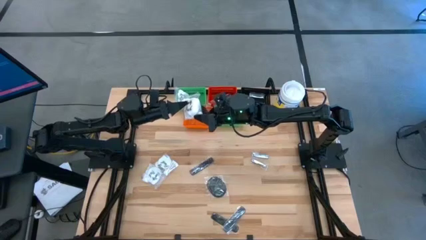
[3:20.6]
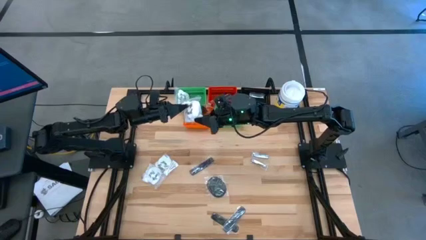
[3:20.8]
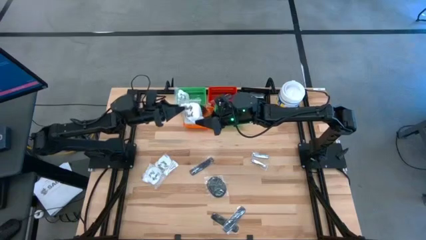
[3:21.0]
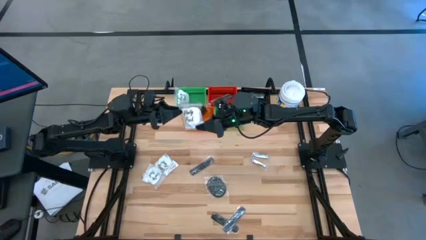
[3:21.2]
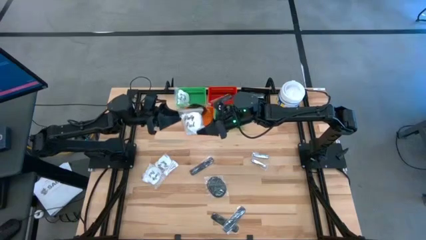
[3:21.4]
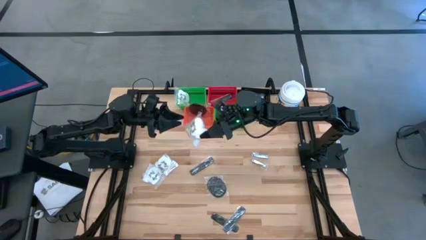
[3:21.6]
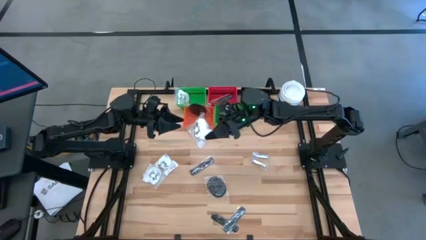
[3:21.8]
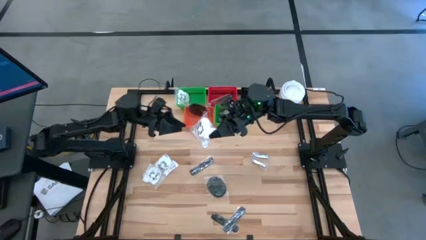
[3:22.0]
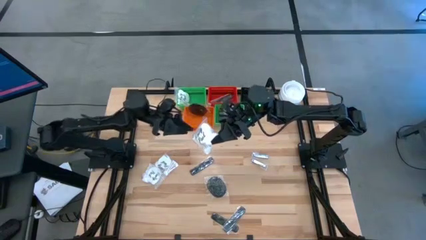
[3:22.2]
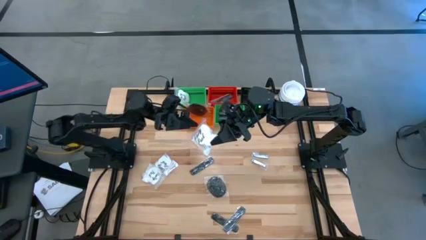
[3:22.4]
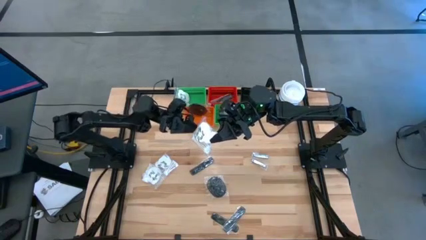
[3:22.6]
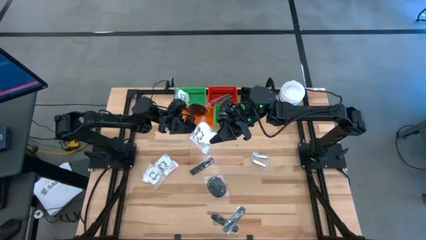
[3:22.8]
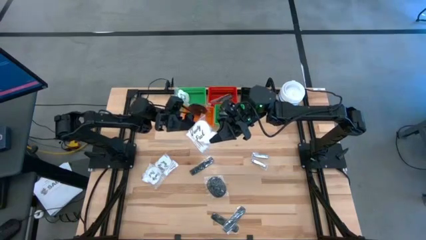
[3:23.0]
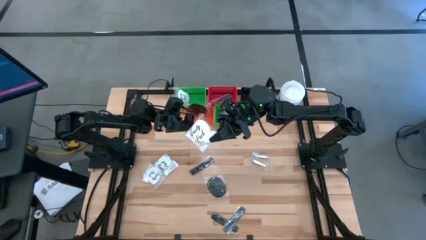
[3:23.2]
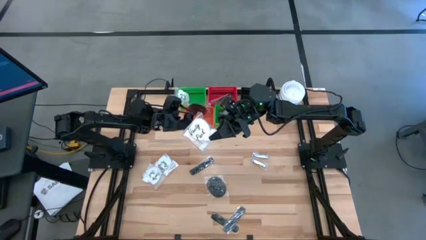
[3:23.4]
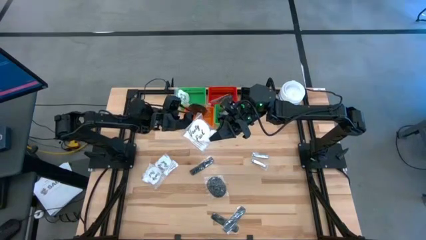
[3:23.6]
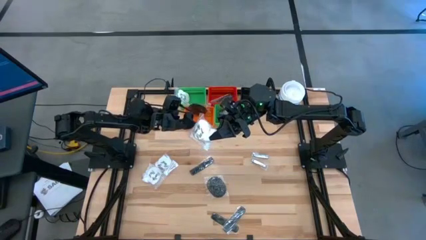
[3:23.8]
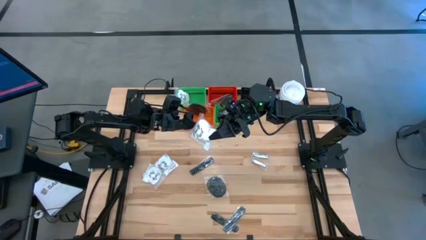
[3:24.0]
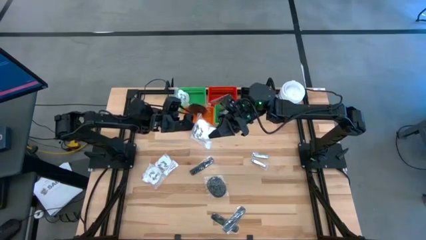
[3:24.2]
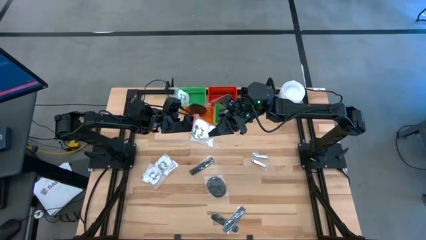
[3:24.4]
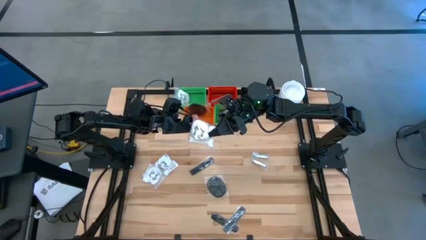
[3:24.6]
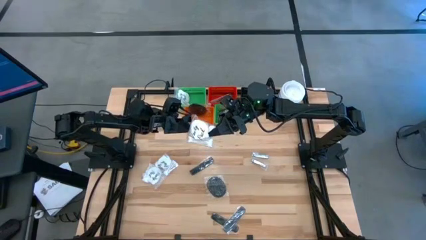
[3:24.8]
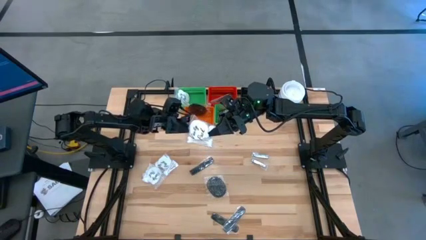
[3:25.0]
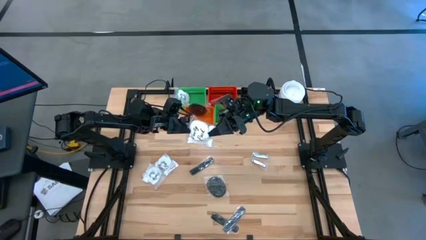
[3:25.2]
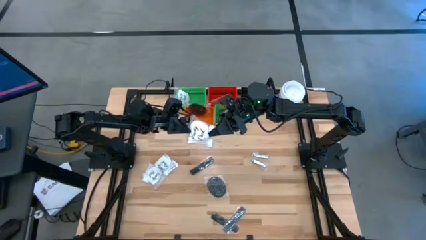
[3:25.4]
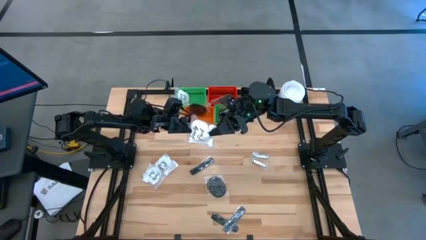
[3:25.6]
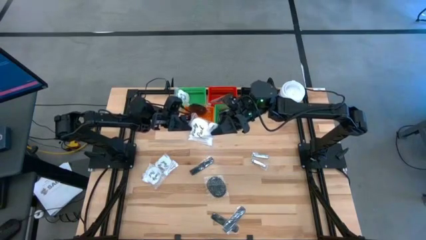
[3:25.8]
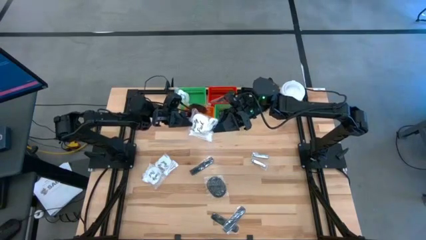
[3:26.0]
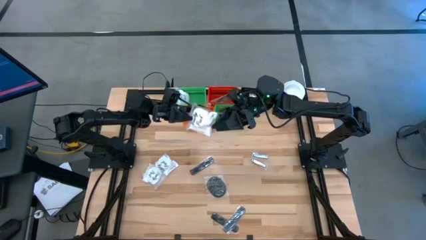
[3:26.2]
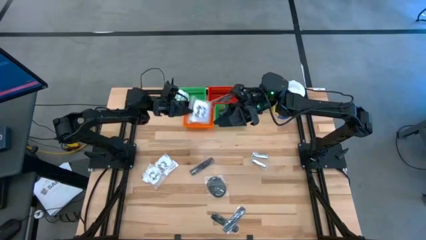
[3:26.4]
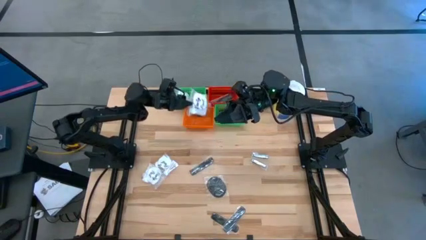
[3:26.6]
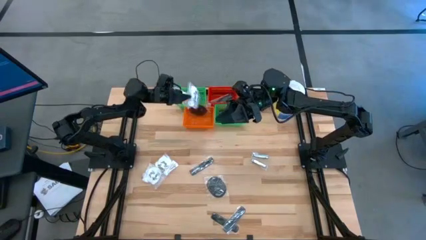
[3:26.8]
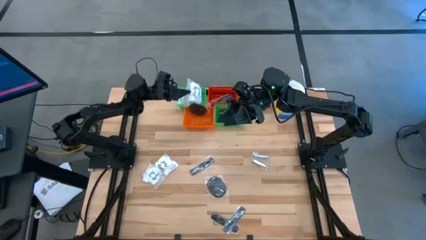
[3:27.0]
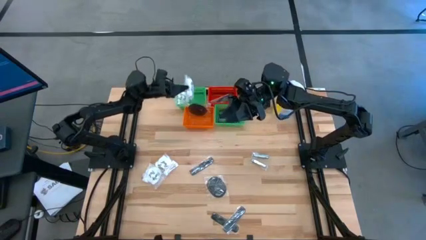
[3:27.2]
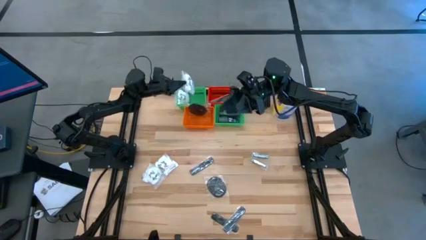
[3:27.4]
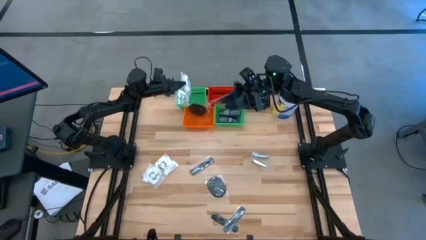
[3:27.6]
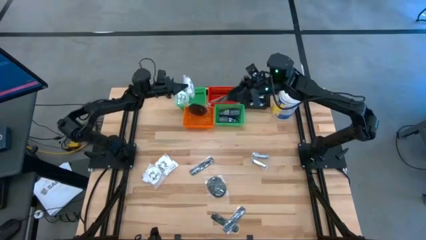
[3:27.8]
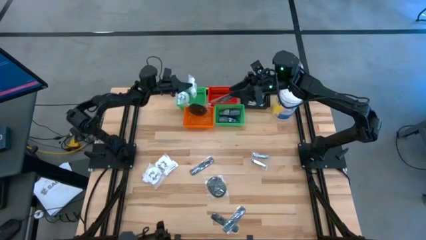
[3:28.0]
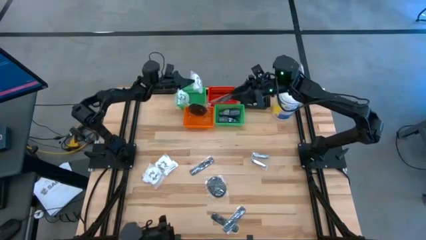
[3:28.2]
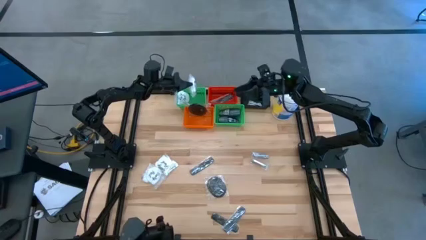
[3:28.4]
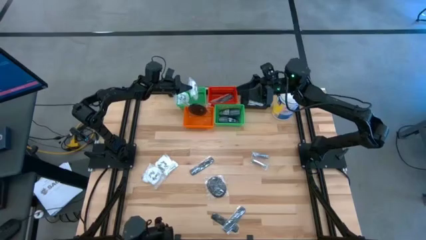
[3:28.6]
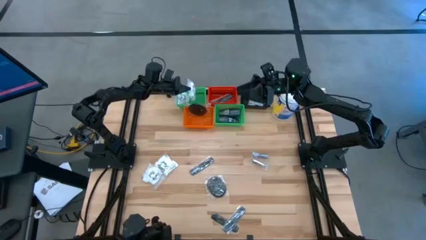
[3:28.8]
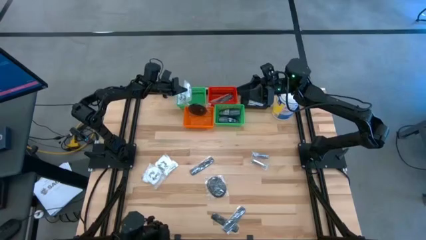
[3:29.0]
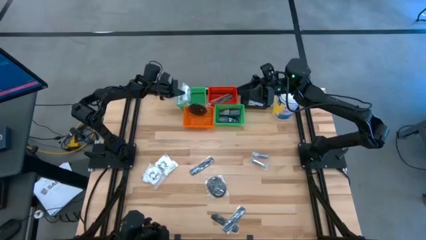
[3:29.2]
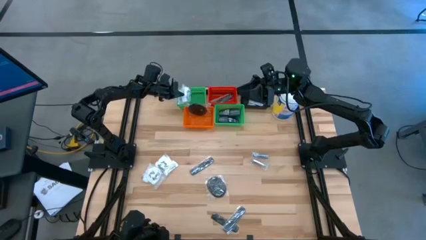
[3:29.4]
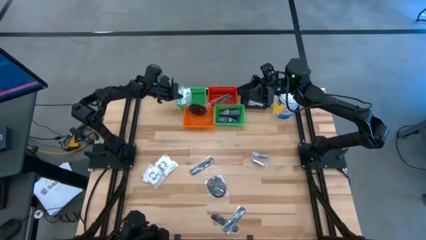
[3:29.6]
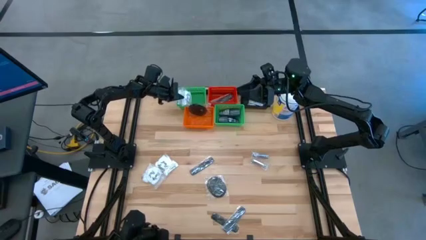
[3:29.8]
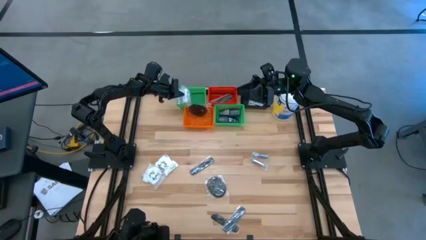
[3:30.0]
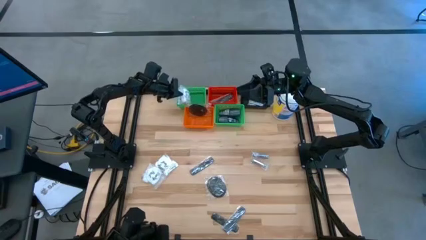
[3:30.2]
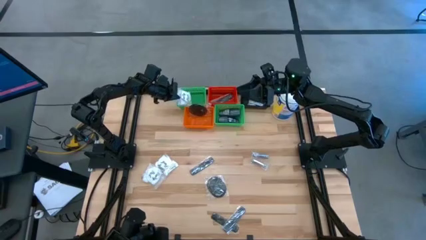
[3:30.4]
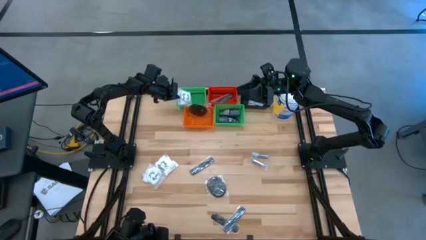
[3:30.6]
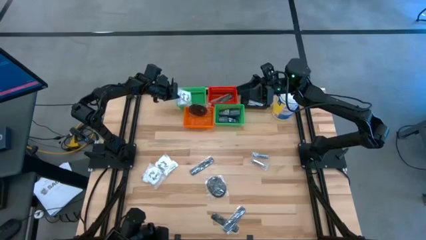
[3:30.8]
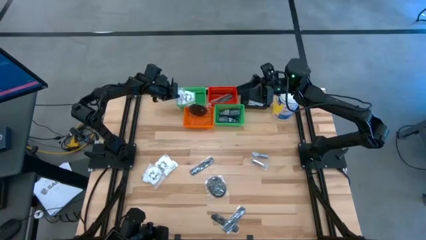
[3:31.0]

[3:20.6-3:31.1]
Task: Pick & Place Travel size toiletries
Put the vanity pack into the green bin

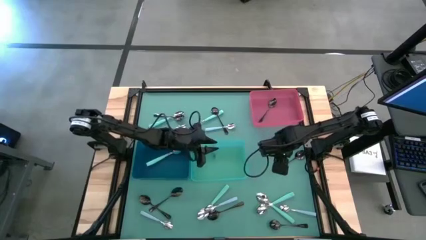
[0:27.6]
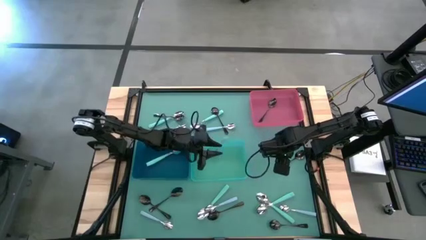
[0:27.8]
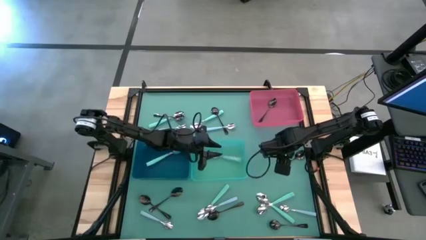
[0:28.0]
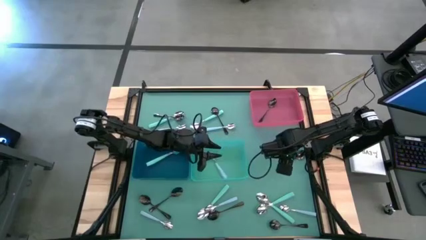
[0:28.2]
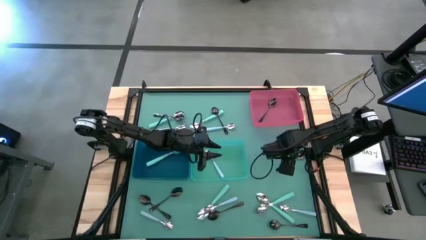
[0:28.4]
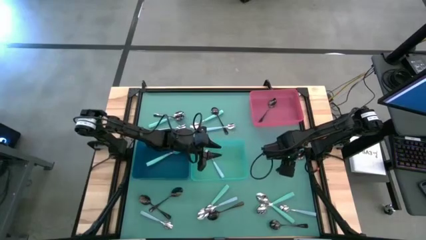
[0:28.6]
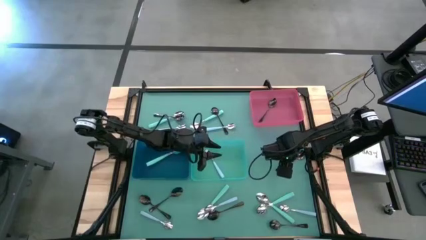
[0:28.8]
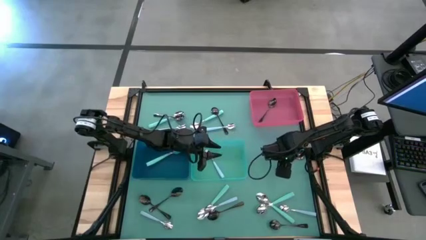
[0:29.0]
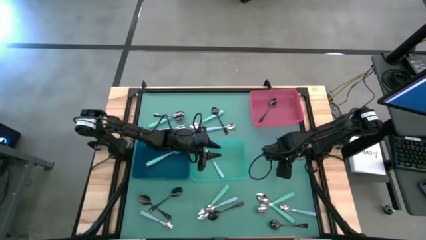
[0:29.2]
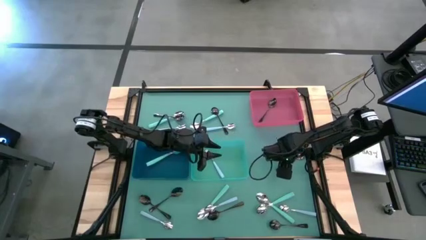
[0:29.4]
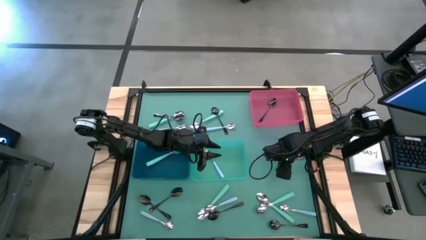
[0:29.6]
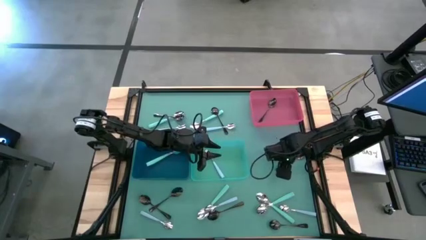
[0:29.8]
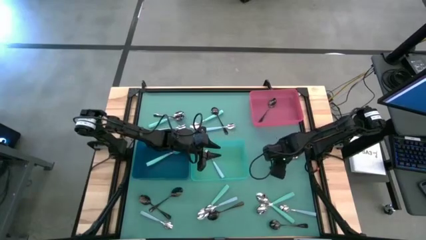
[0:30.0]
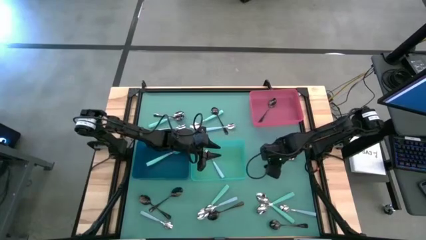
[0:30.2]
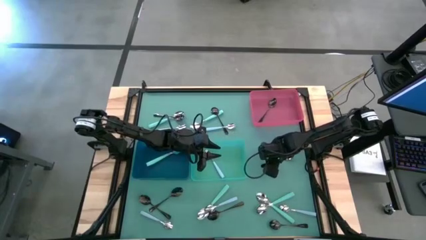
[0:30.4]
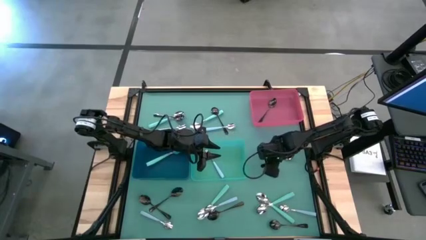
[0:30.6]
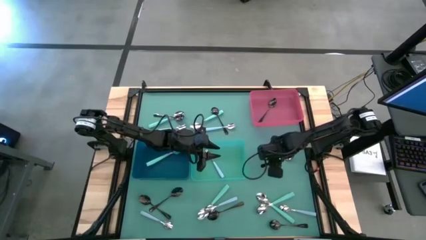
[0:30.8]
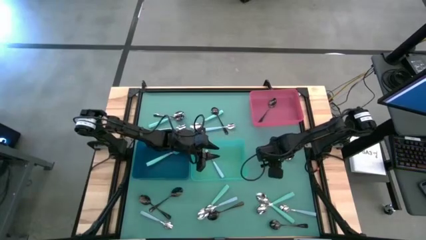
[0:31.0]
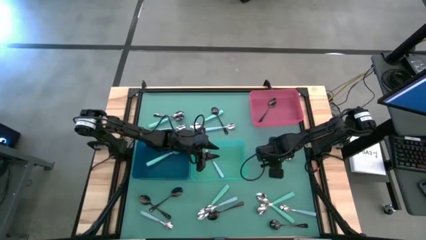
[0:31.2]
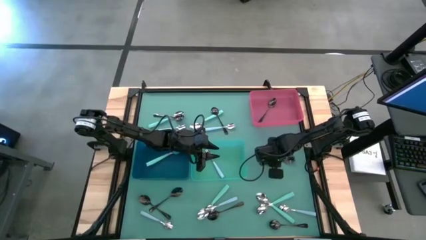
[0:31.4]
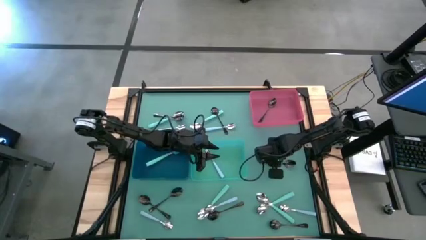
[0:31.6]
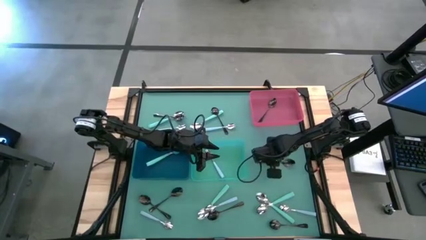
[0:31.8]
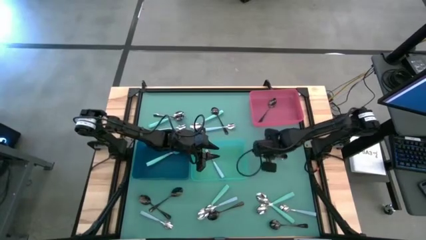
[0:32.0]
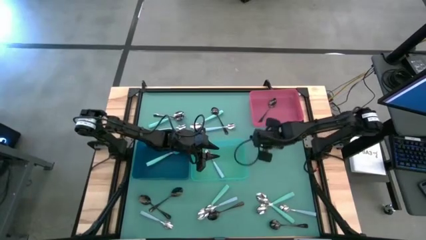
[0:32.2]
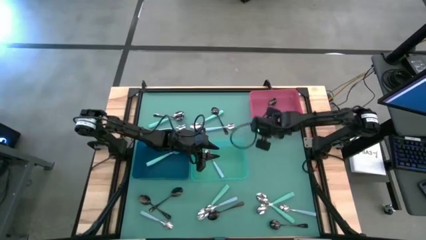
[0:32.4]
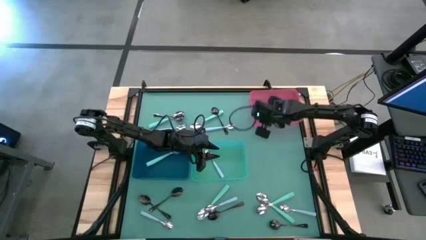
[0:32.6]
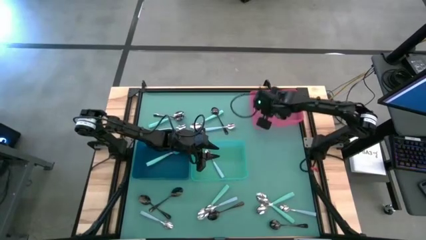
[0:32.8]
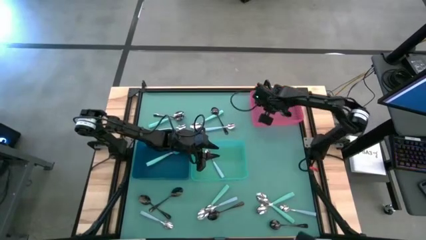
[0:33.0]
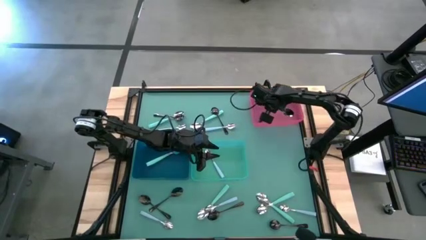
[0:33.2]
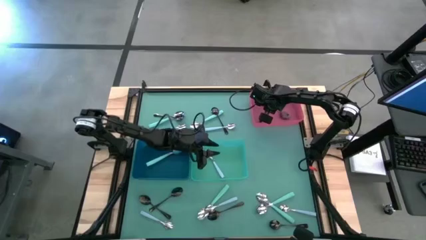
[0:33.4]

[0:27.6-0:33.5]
Task: Sort silverware by color (type)
Put the black spoon into the pink bin
